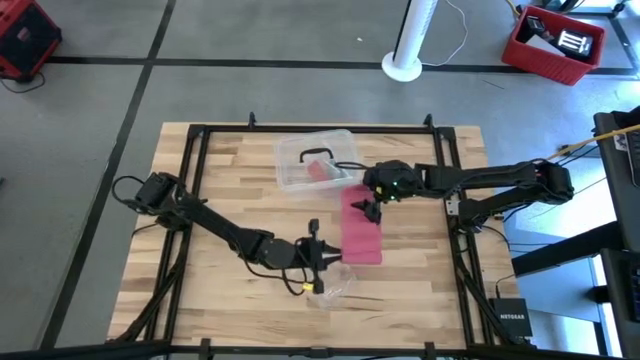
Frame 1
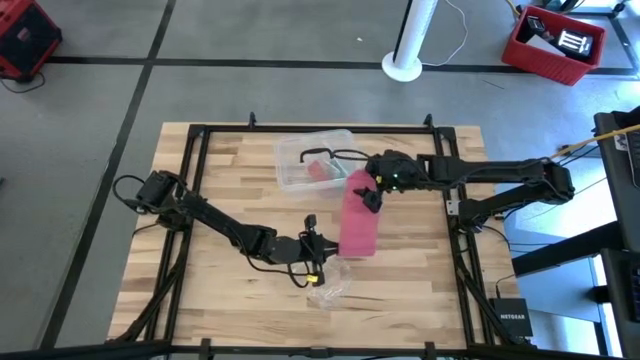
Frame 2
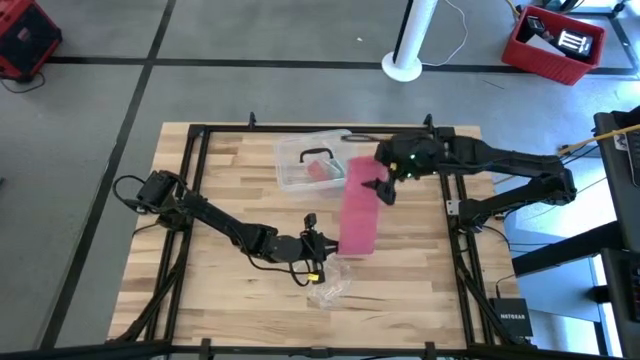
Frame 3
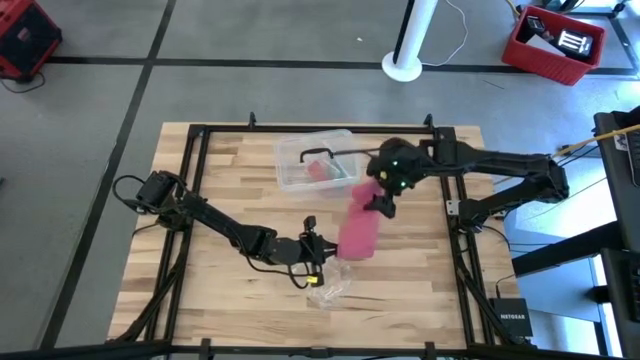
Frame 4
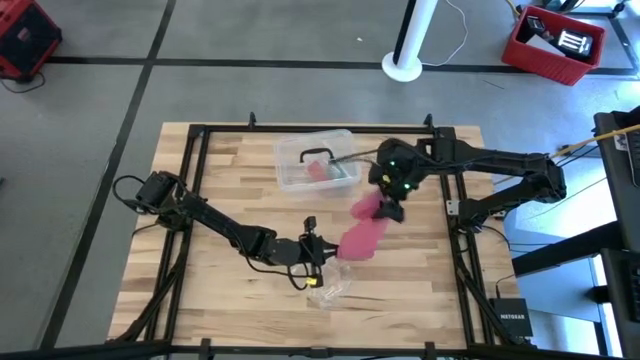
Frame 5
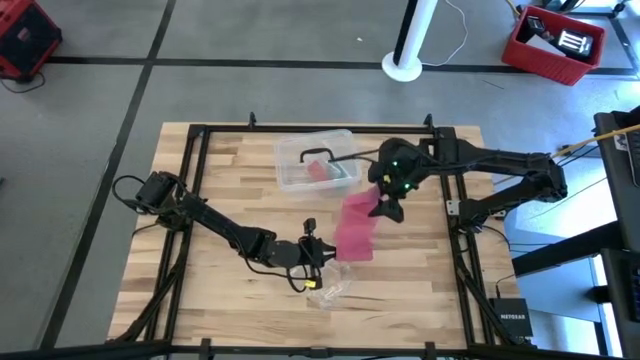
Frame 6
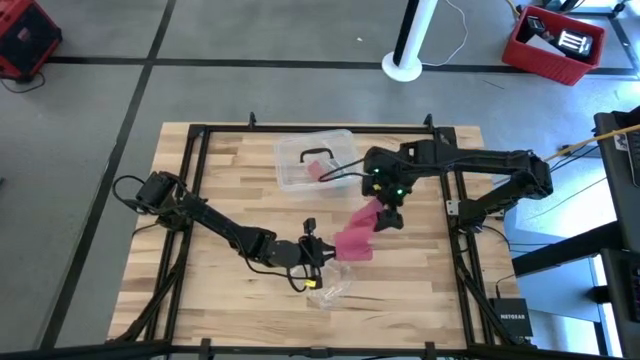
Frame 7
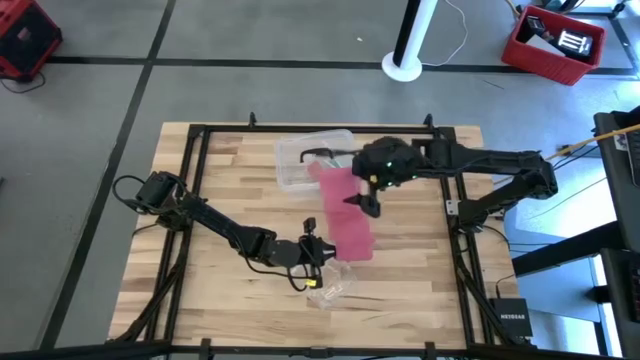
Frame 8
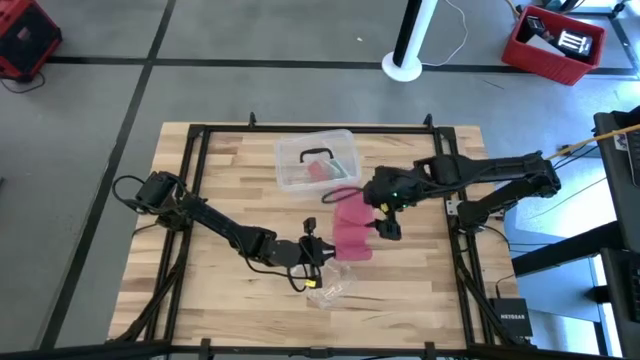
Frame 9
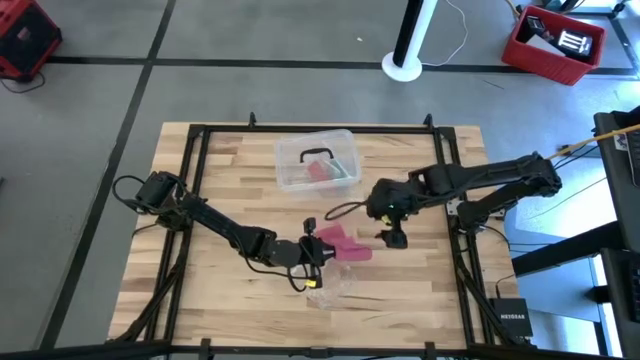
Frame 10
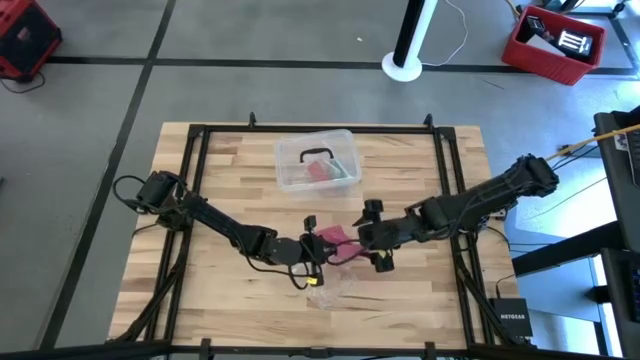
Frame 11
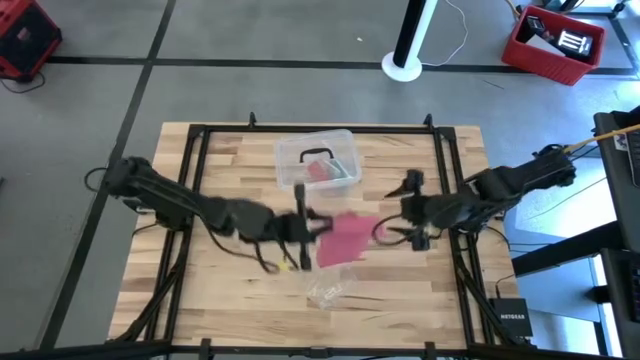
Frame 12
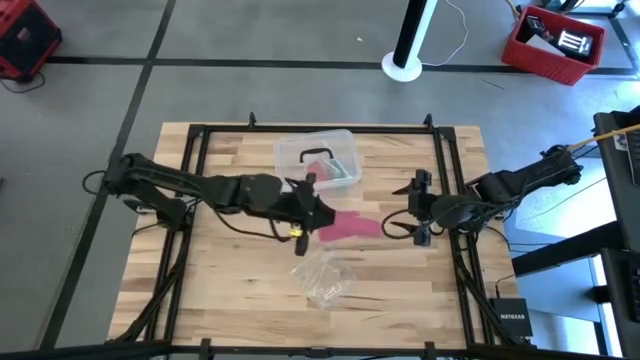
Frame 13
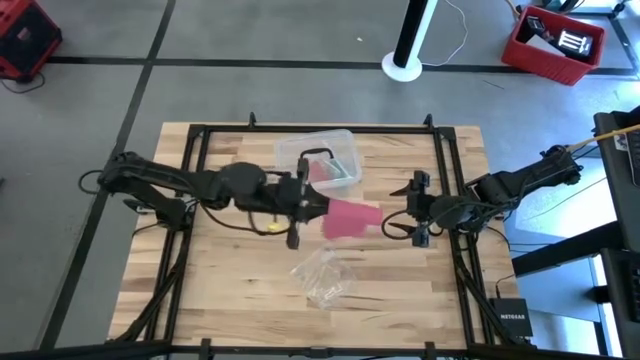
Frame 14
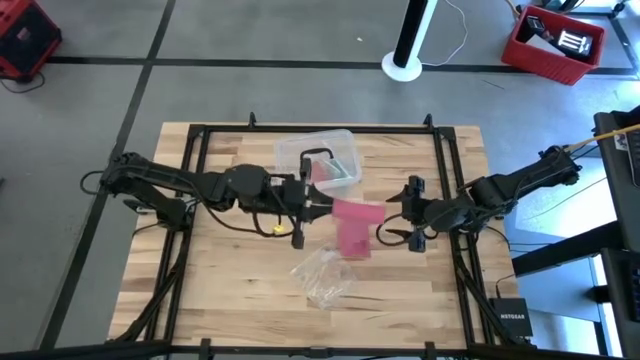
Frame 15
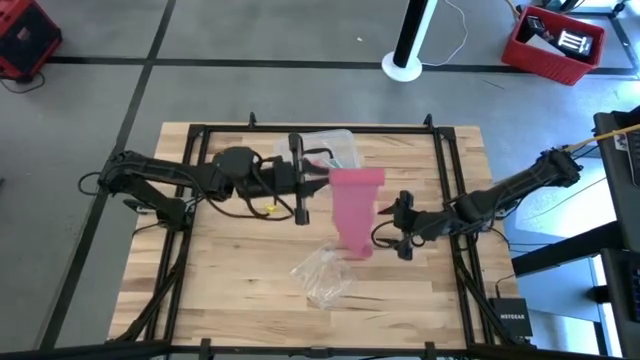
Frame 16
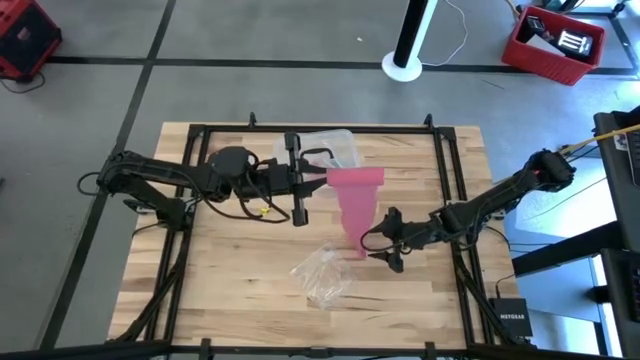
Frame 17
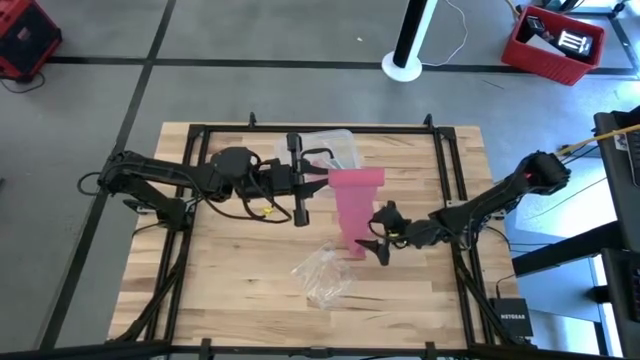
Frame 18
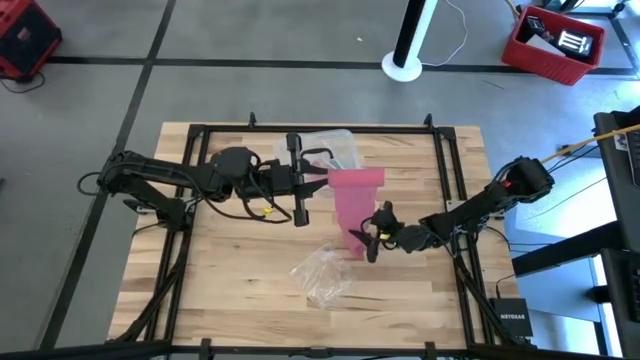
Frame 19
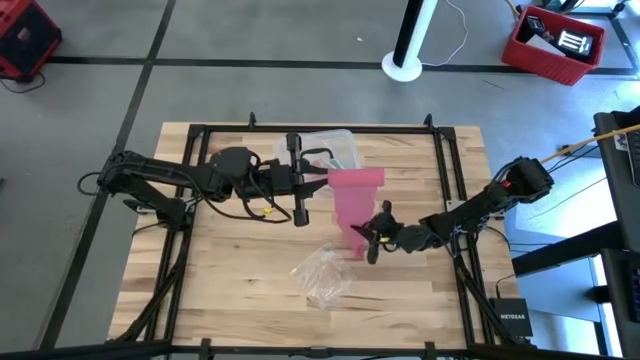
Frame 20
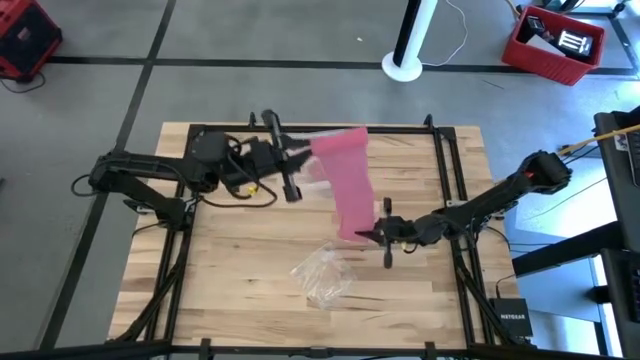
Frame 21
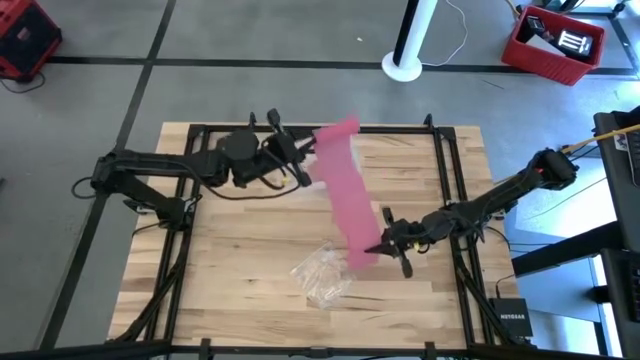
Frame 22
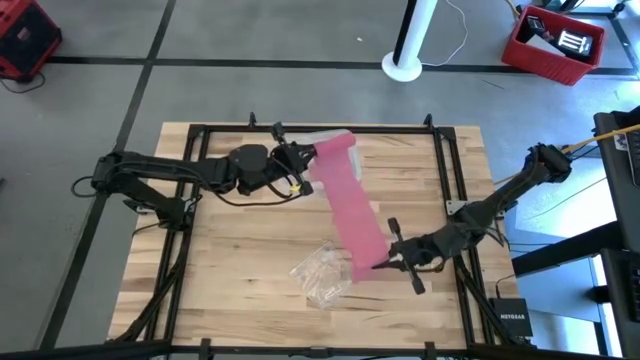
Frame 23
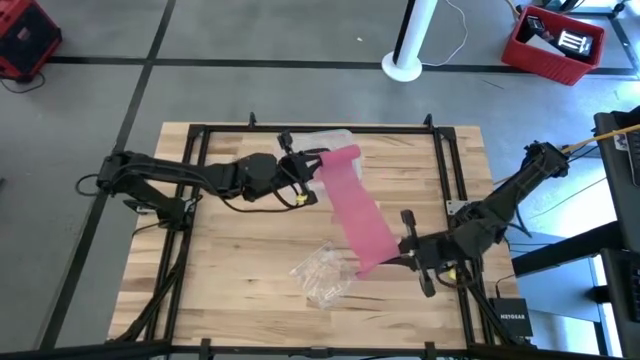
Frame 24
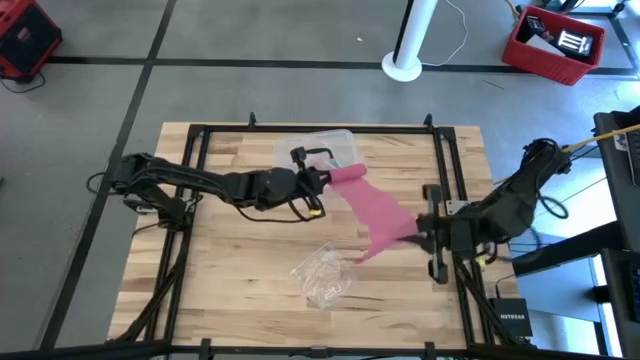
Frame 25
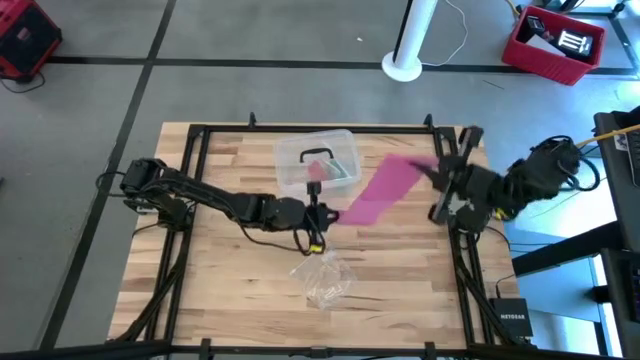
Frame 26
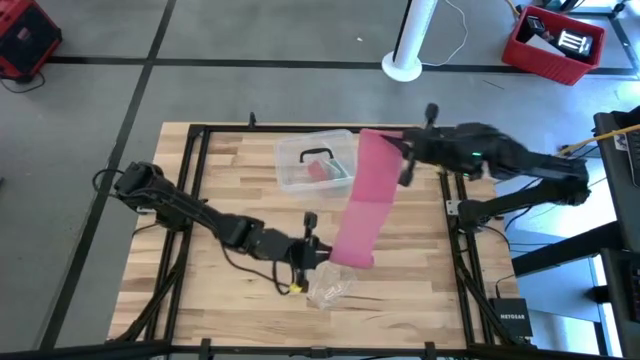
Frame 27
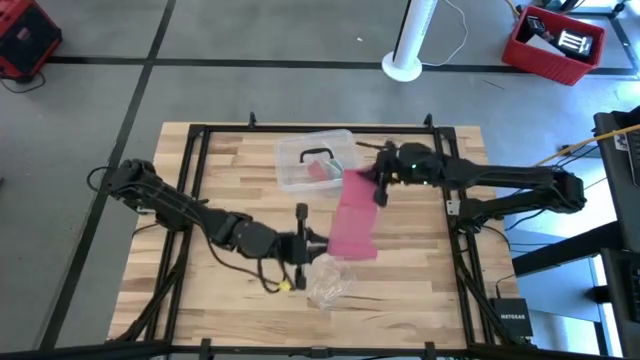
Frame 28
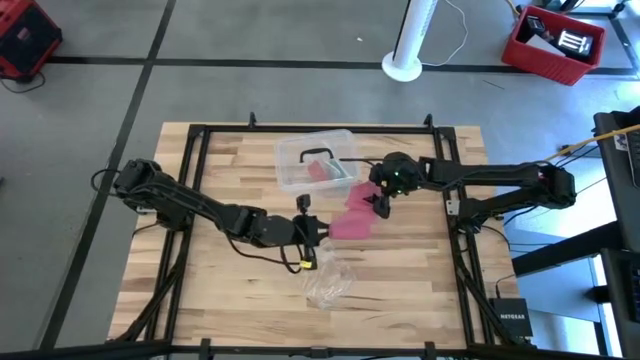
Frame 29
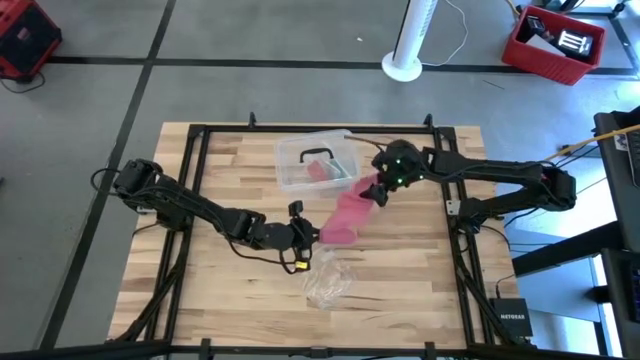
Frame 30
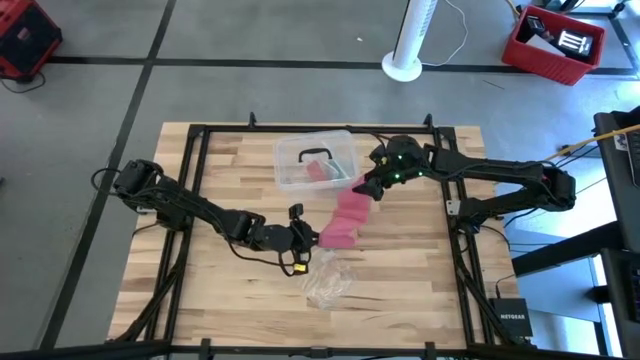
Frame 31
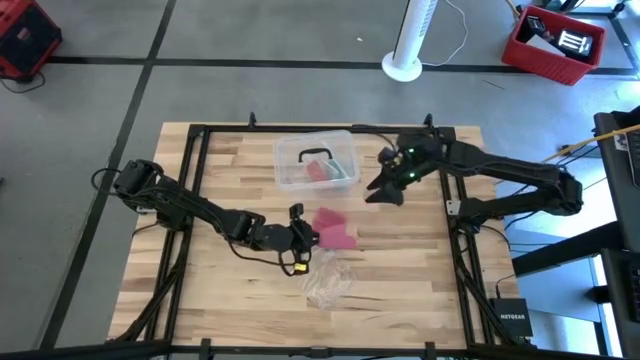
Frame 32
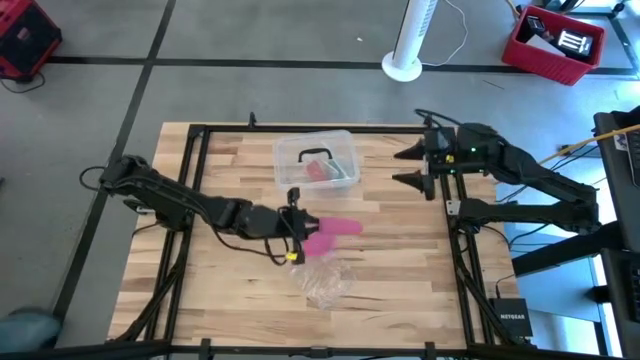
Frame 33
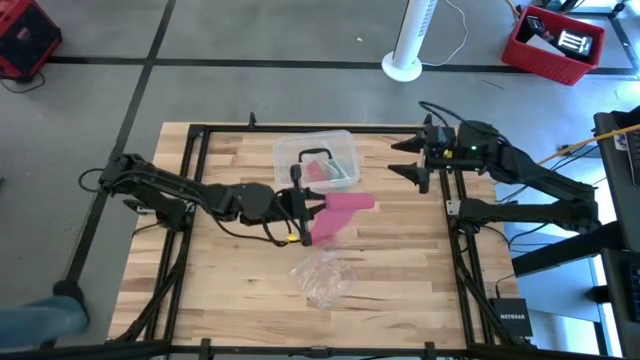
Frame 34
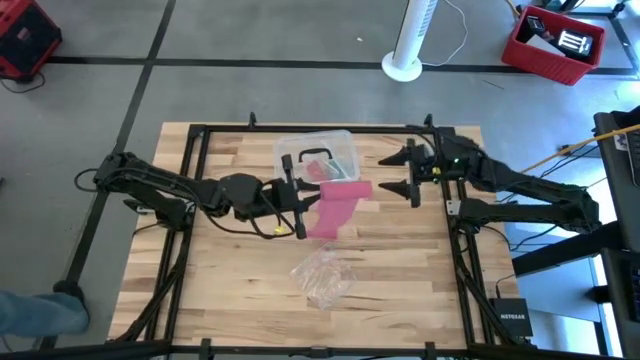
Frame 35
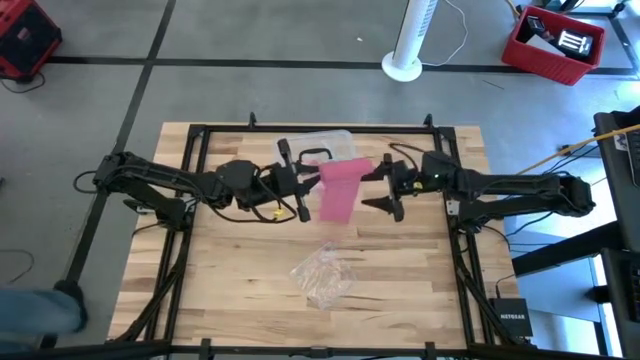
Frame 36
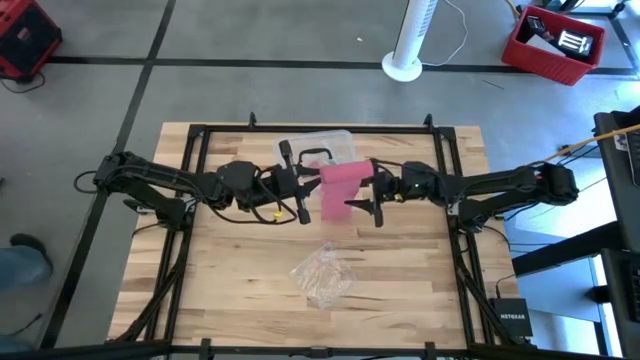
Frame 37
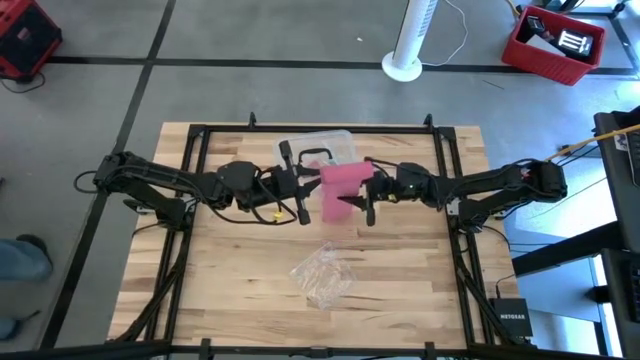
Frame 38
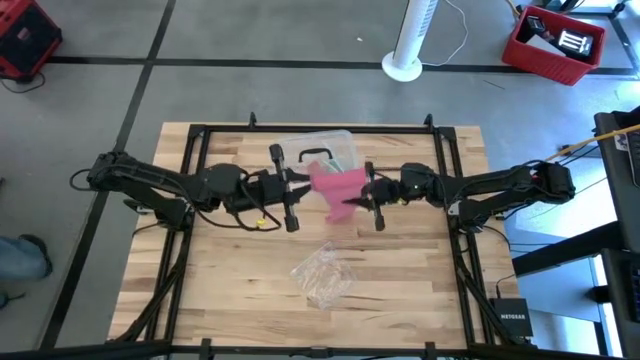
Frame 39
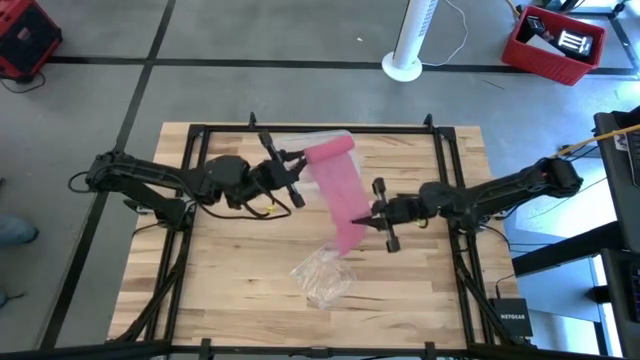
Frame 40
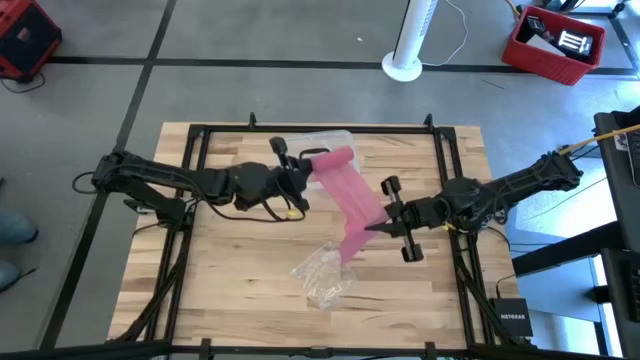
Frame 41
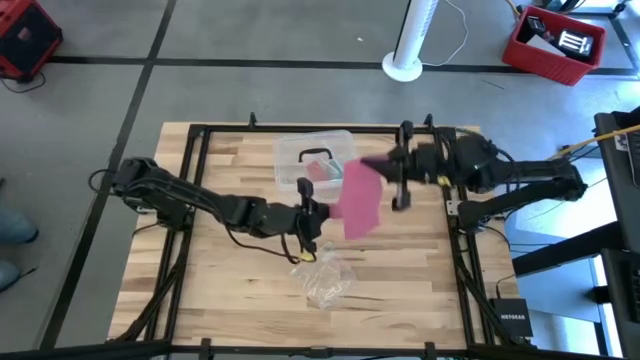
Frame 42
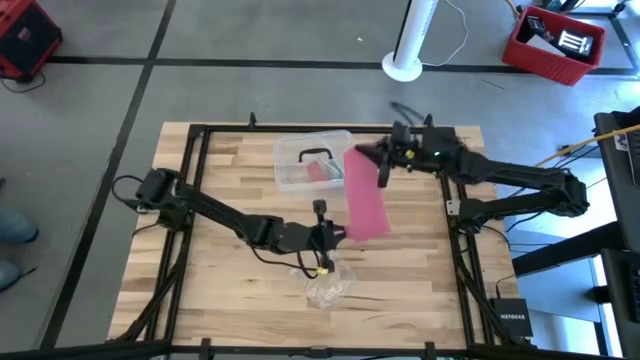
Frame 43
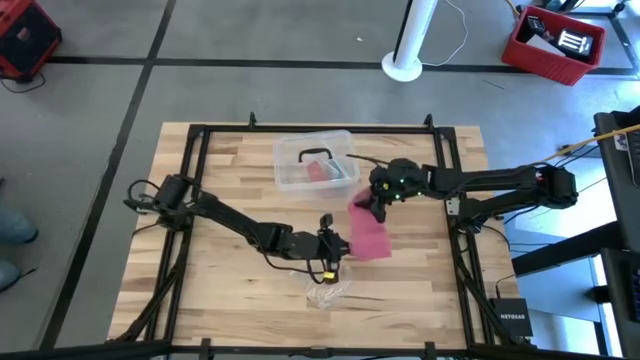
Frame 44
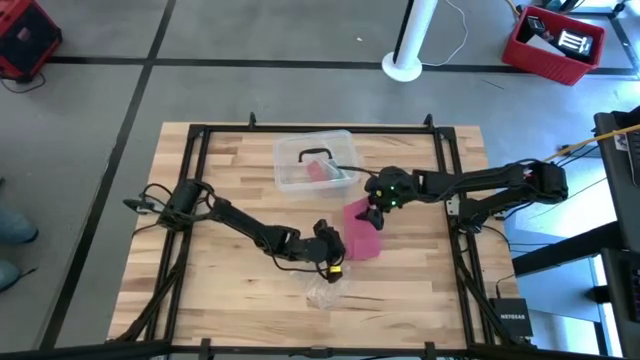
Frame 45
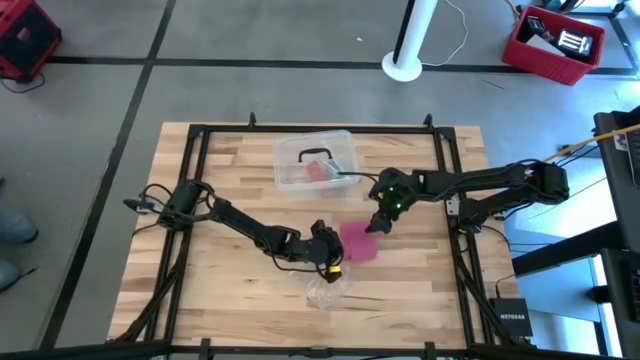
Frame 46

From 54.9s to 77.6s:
Task: Roll bandage
Roll the pink bandage

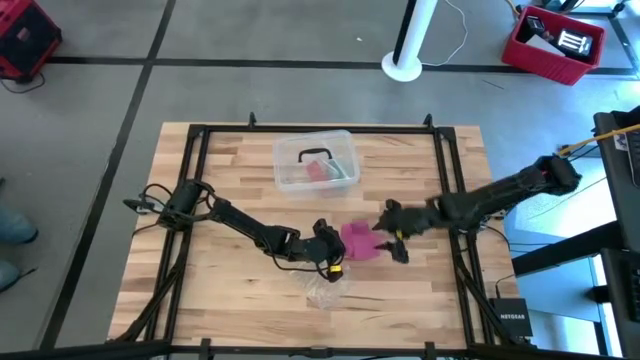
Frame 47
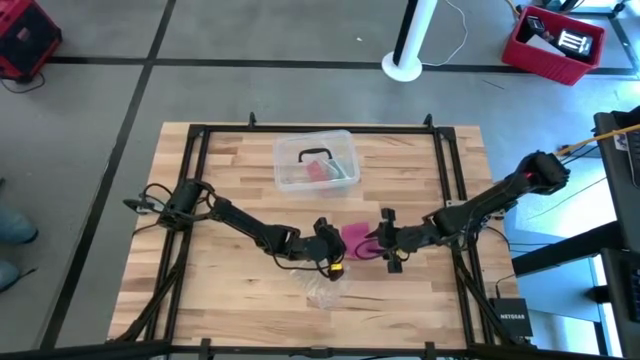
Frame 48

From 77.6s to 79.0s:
Roll the pink bandage
